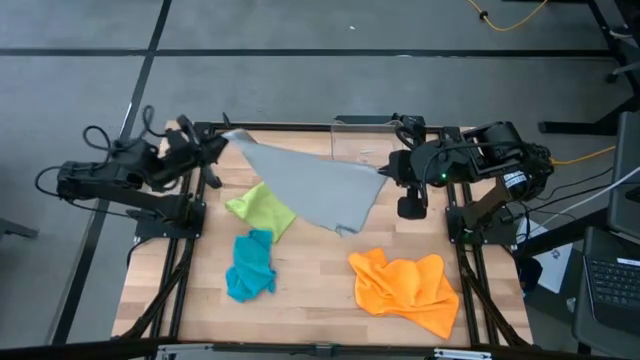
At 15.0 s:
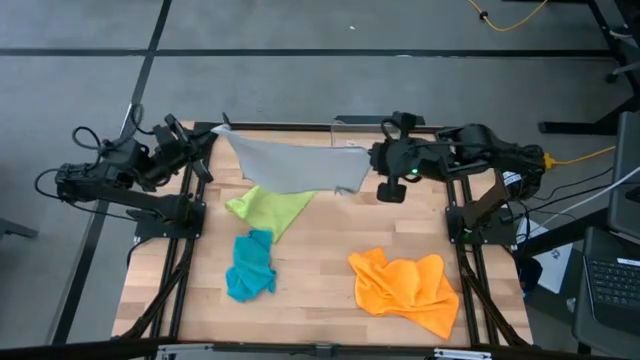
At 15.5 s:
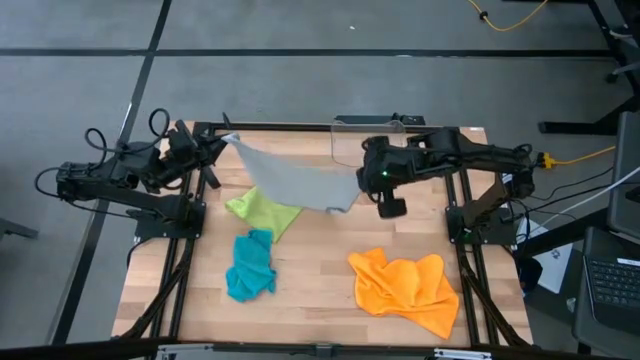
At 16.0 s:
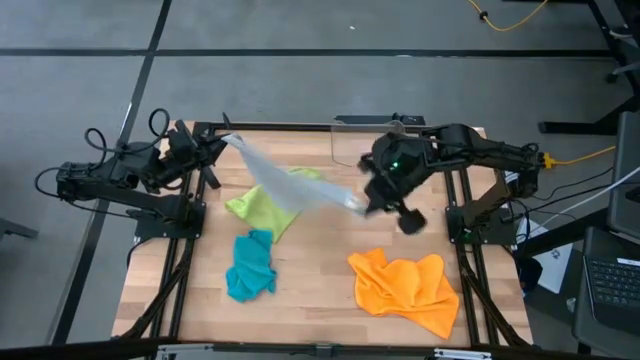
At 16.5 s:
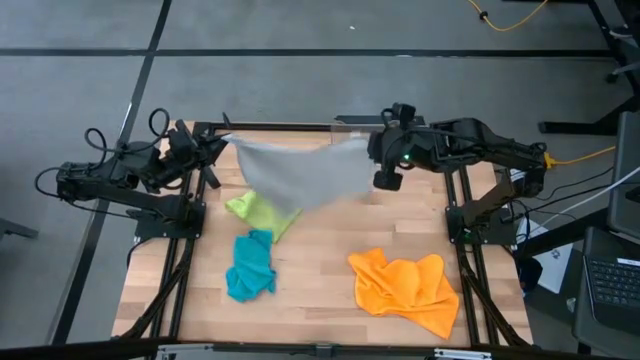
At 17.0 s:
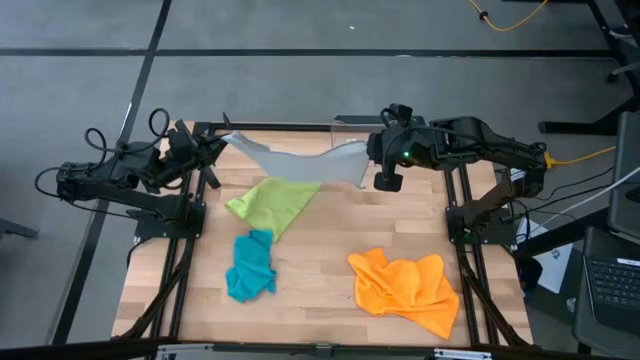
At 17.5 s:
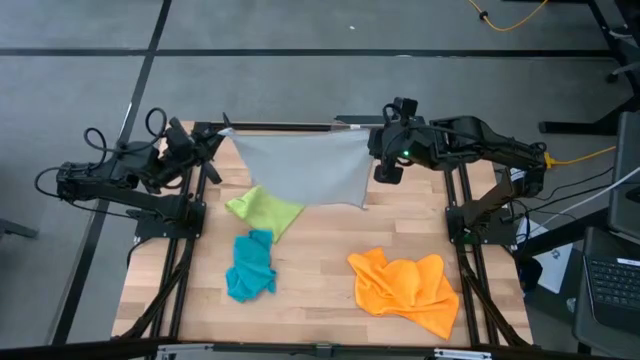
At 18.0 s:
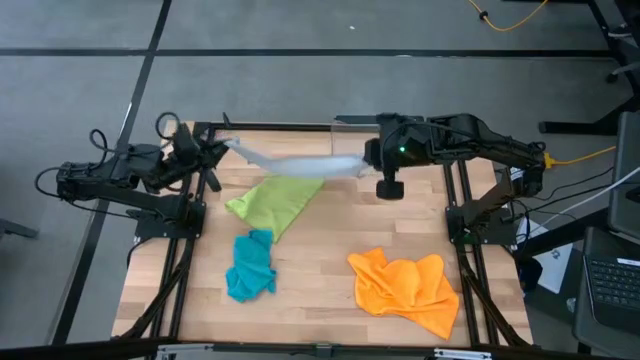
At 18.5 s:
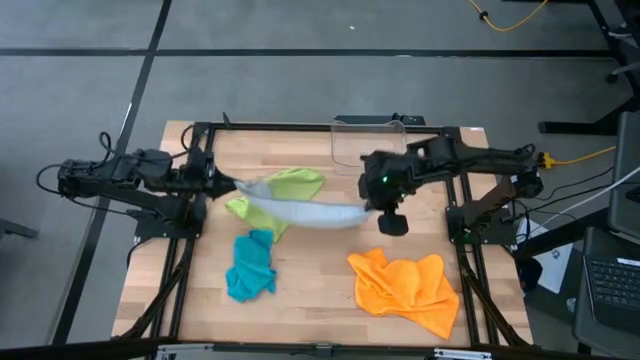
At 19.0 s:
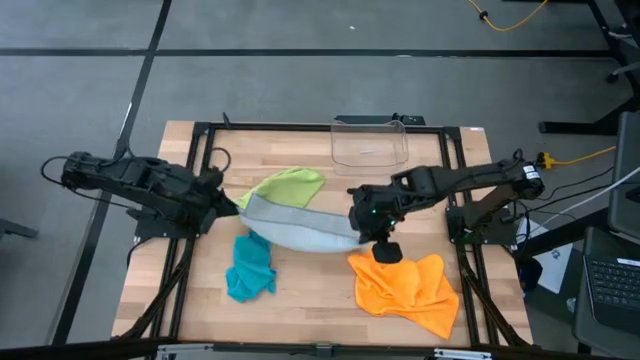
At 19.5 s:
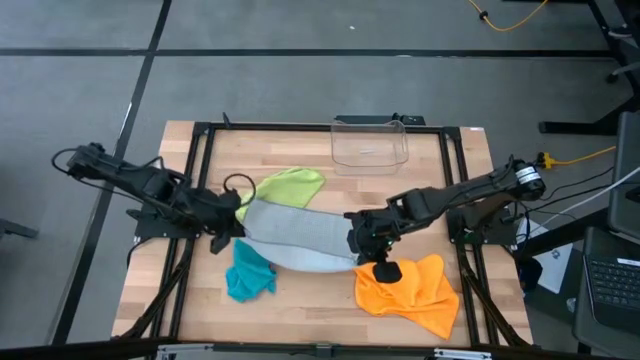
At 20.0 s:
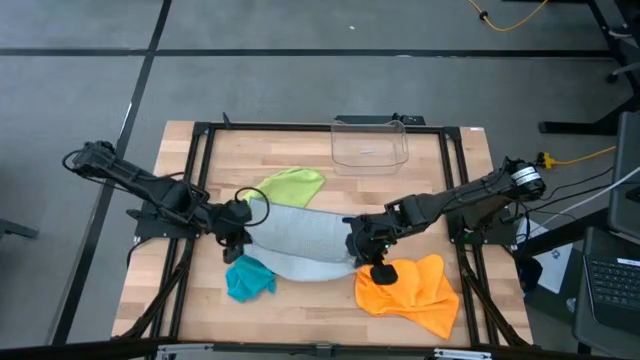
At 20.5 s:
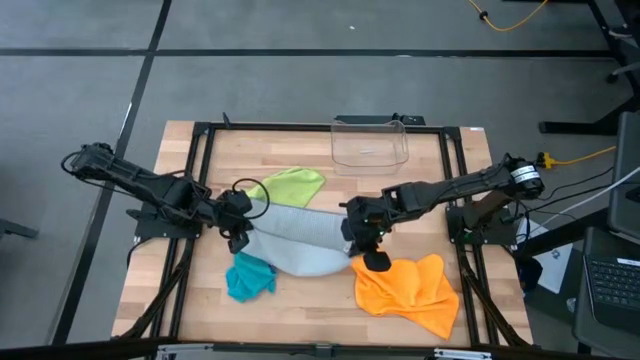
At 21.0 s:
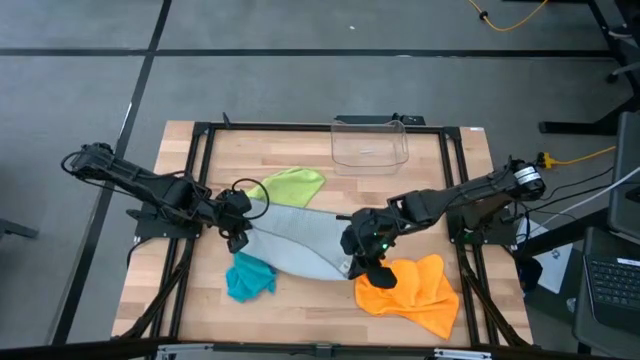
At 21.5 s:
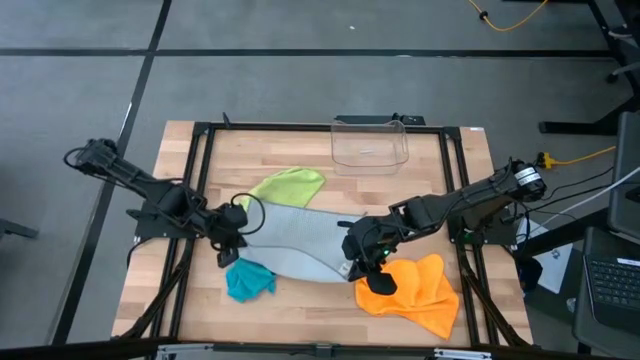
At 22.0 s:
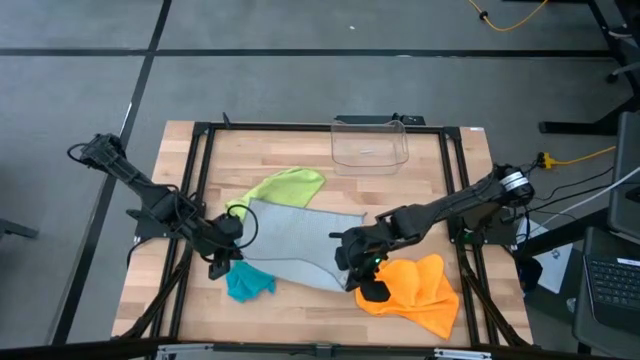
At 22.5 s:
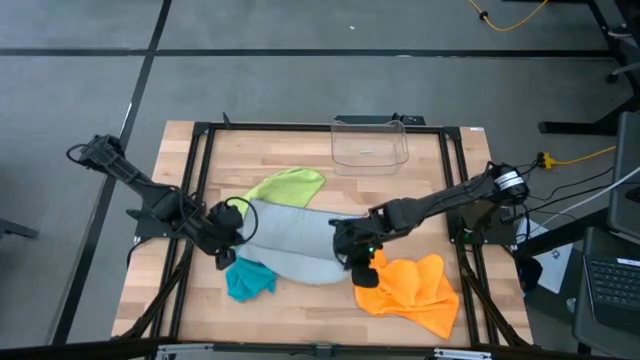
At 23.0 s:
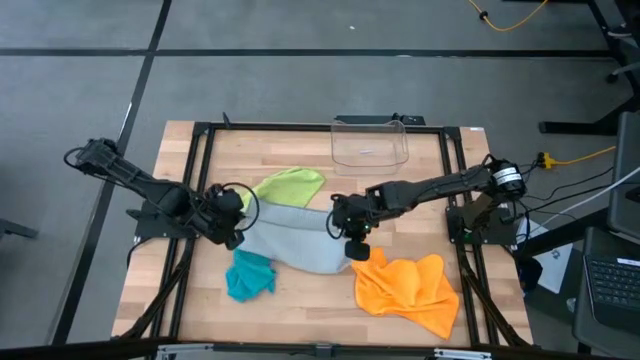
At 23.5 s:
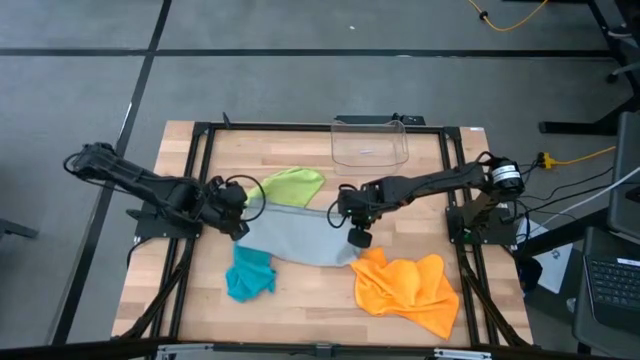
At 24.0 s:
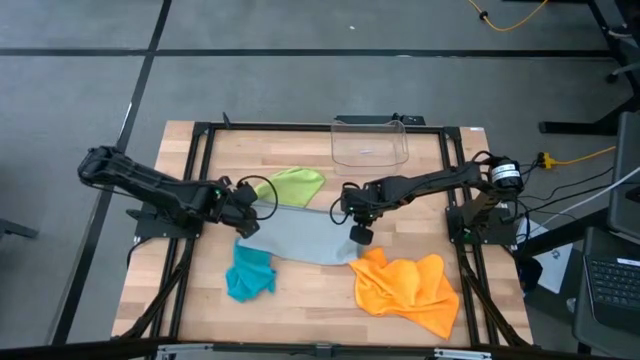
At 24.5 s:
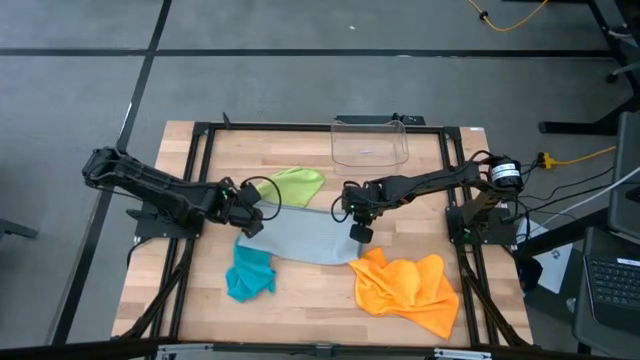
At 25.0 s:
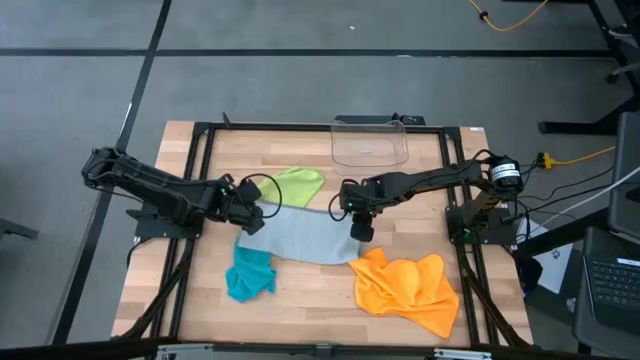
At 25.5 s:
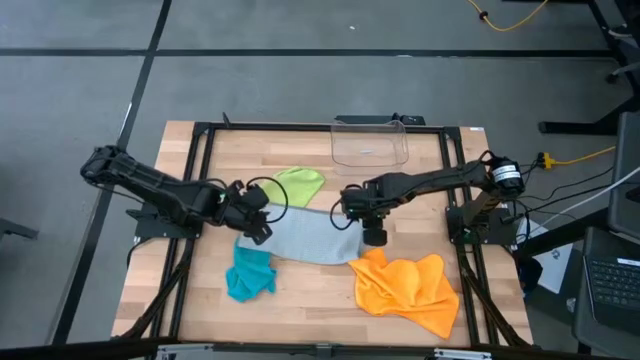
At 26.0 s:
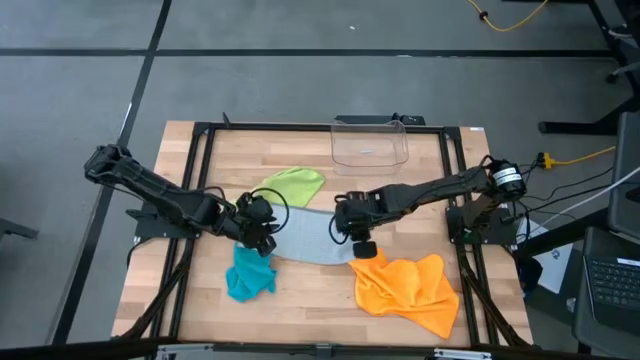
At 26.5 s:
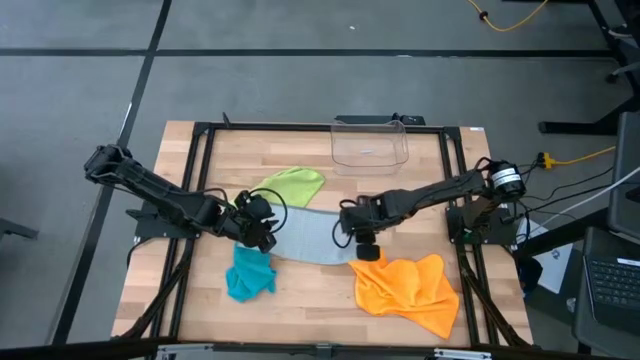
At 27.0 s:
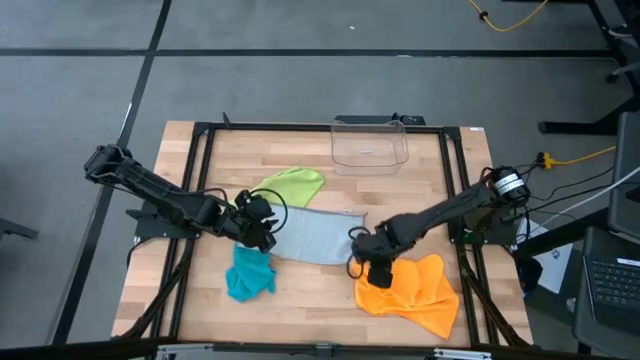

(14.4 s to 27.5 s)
Task: Fold microfiber towels
Fold the gray microfiber into half

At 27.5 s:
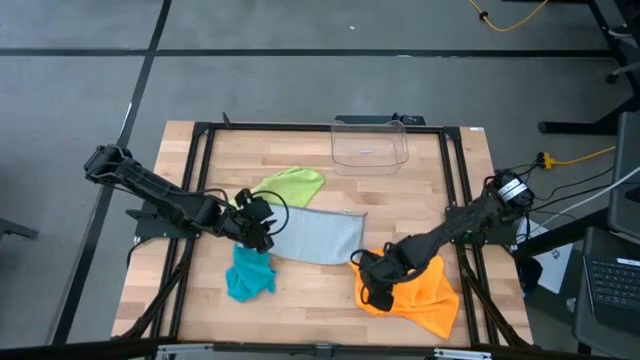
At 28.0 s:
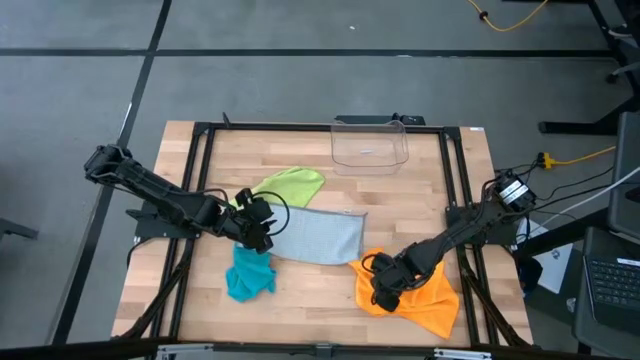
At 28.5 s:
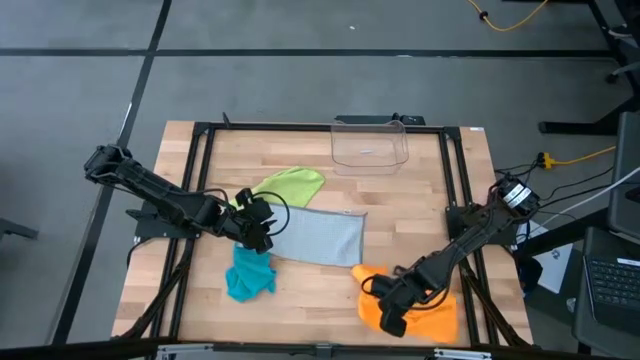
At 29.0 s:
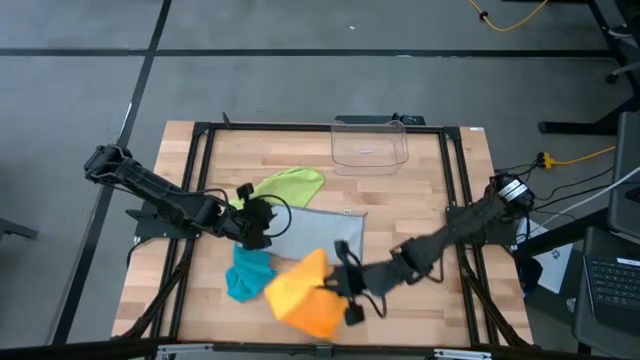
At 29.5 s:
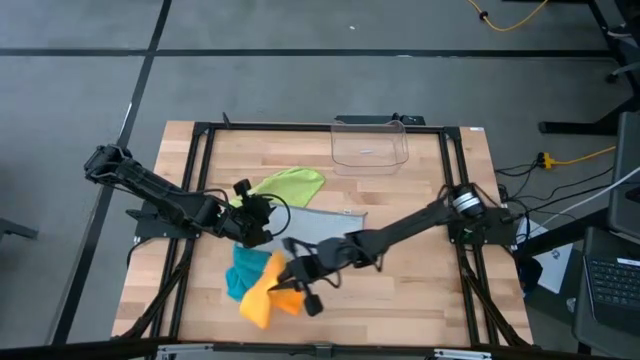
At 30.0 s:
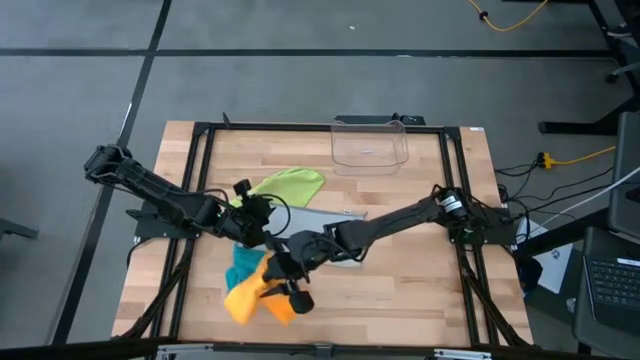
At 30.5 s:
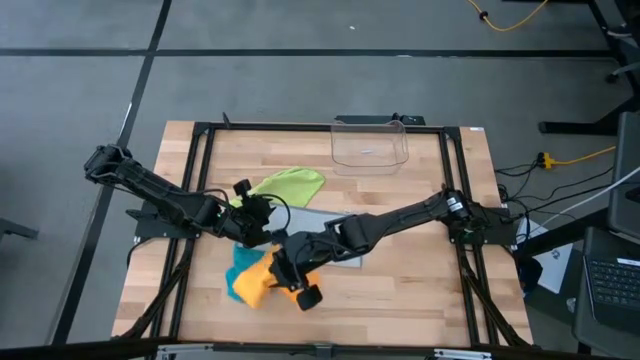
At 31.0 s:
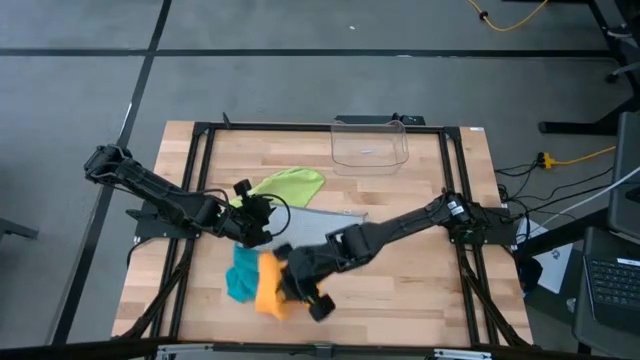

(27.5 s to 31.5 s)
Move the orange microfiber to the left of the table

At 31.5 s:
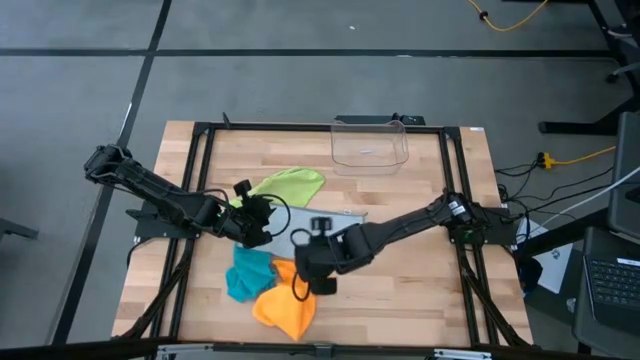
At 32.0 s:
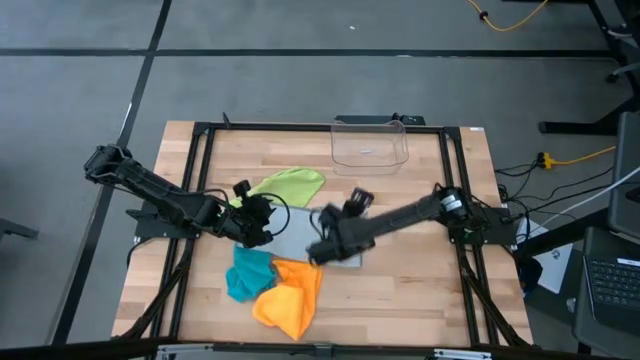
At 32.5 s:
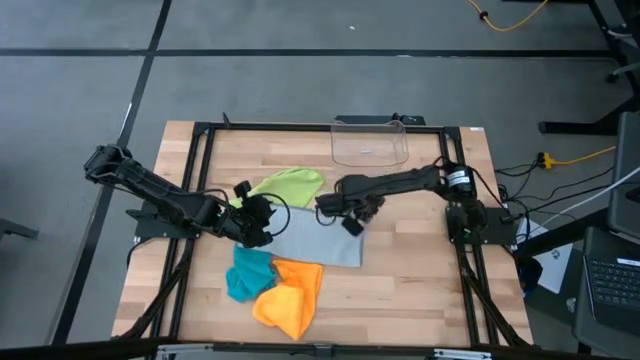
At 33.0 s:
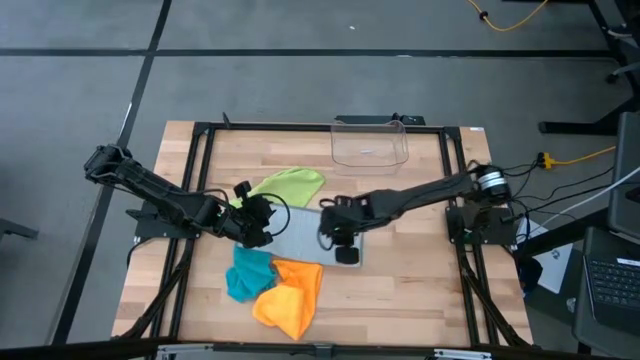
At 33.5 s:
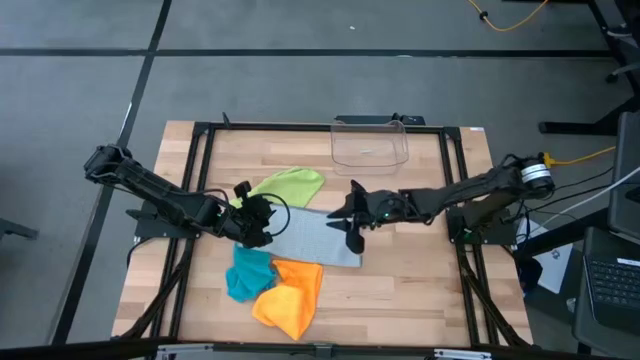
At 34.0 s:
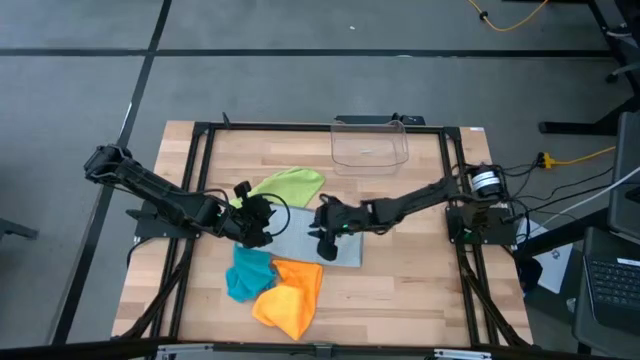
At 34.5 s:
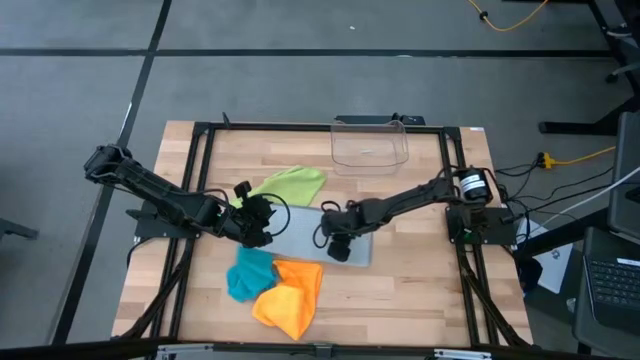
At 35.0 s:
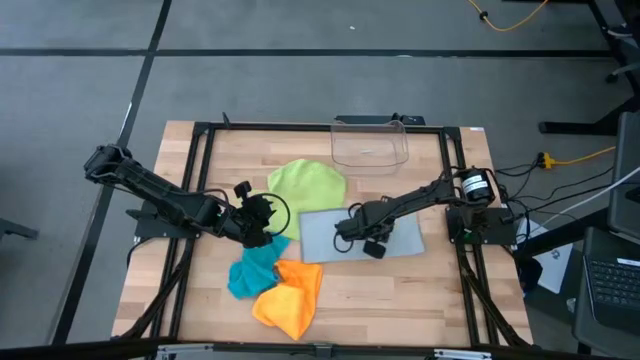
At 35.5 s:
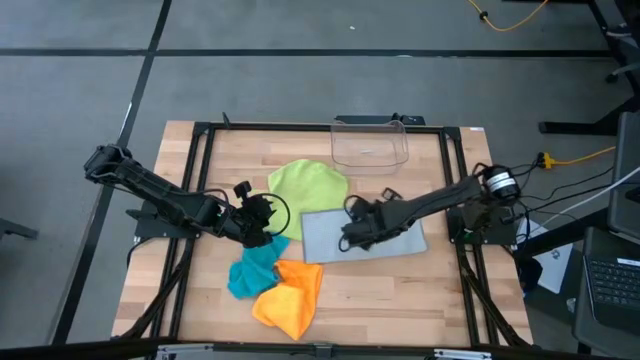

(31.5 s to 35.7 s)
Move the gray microfiber to the right of the table
